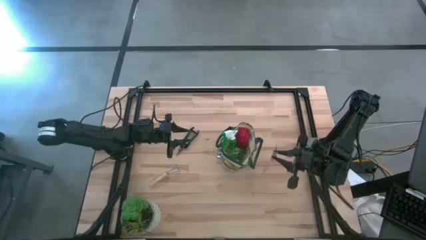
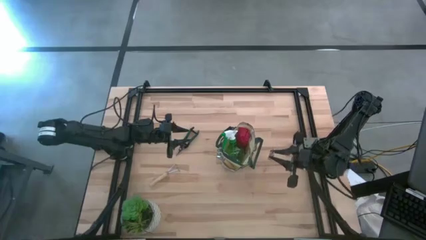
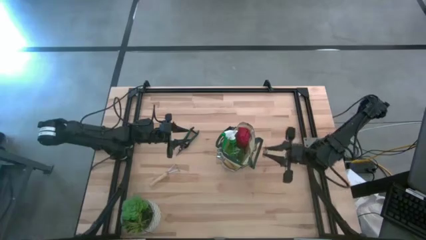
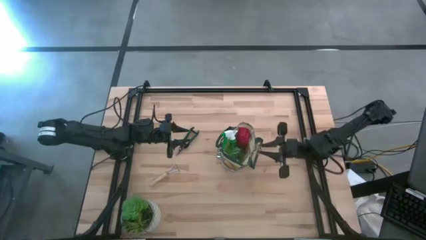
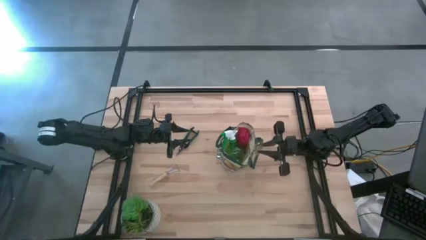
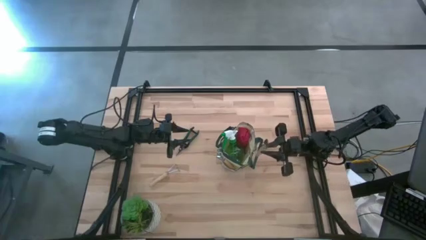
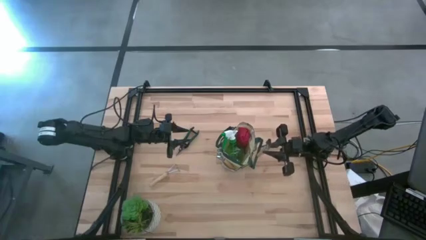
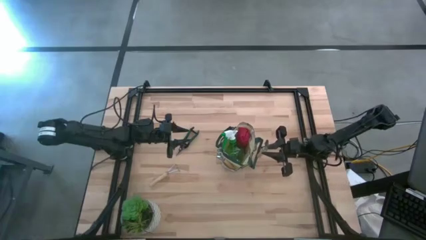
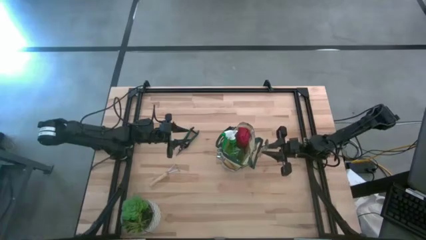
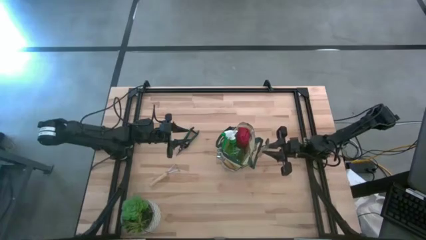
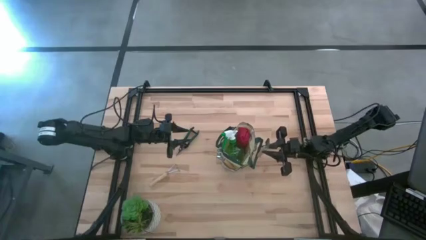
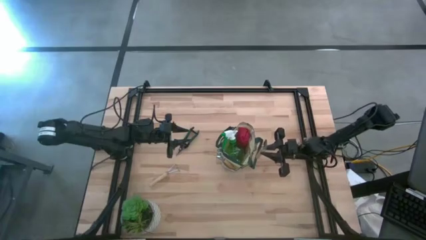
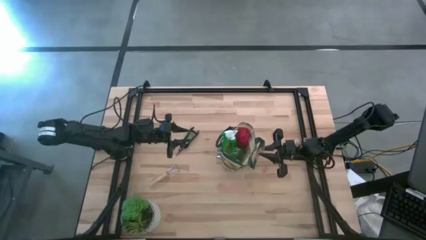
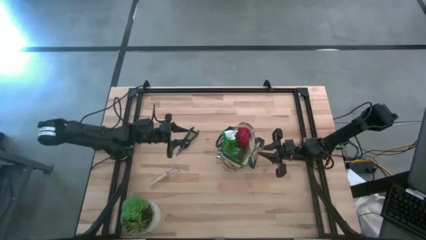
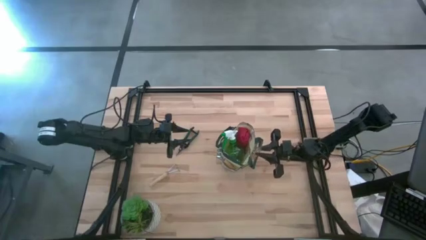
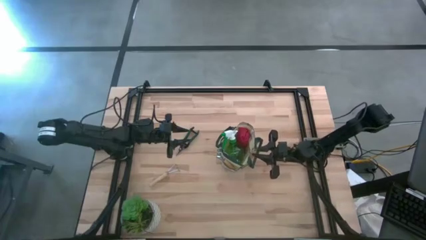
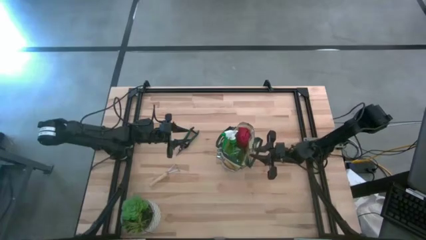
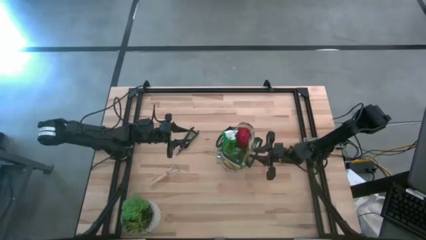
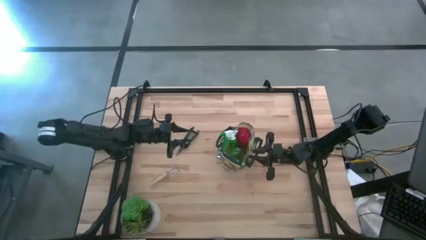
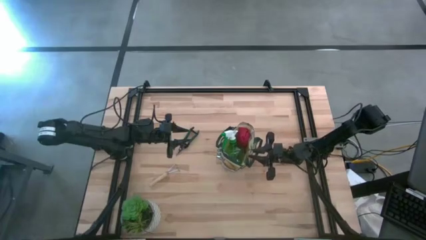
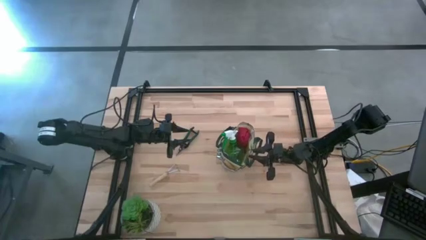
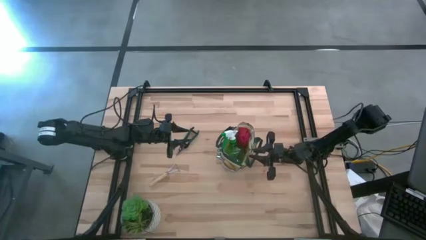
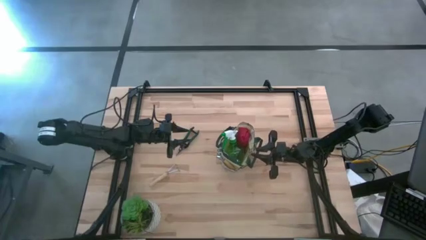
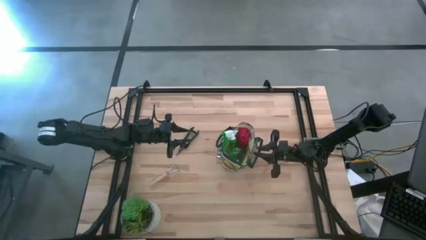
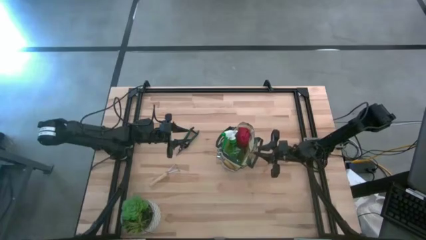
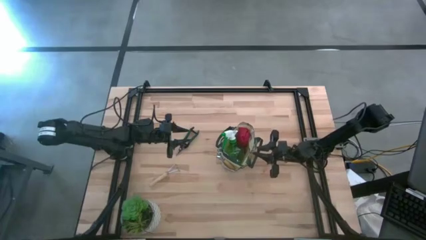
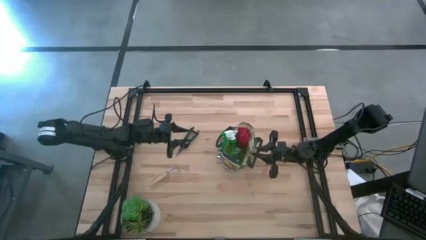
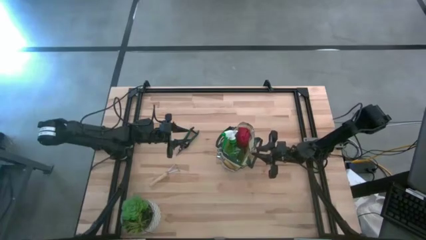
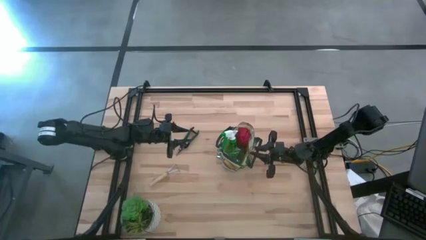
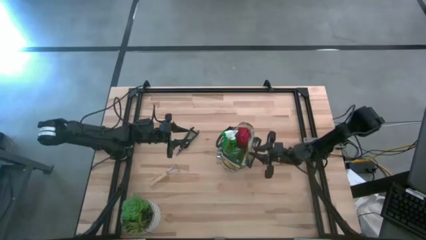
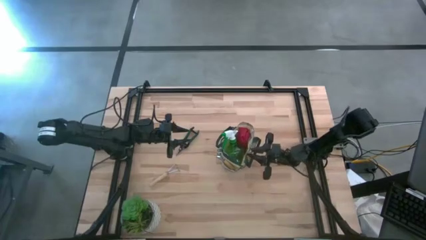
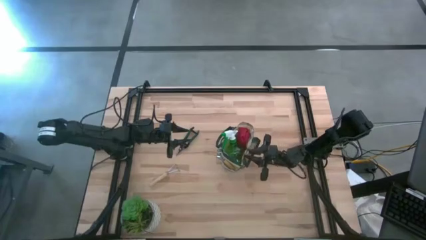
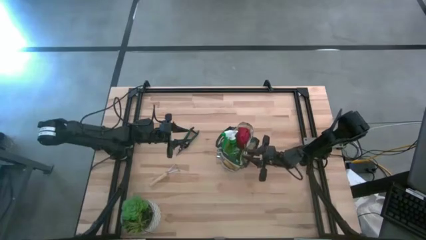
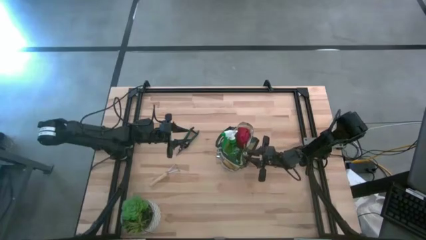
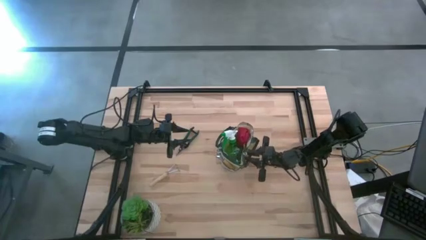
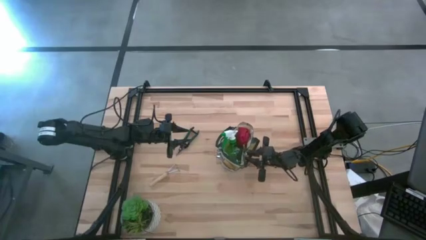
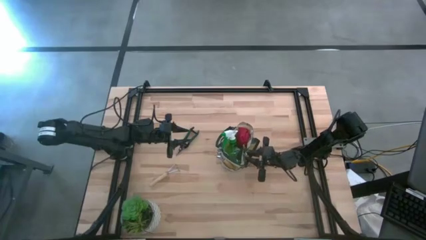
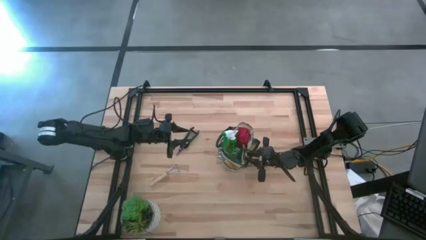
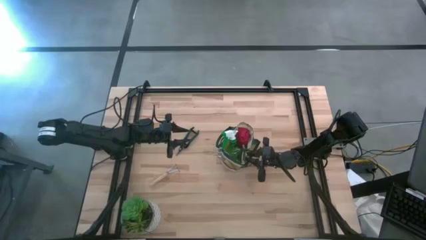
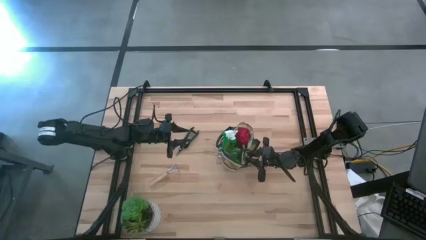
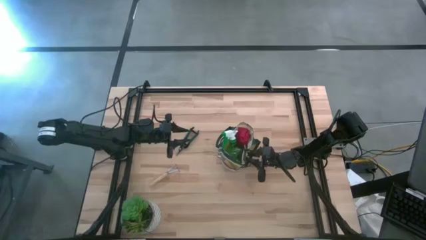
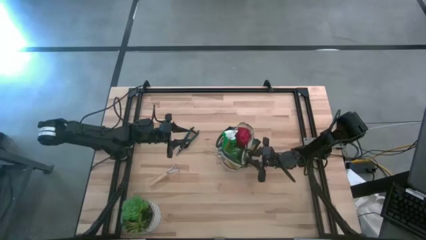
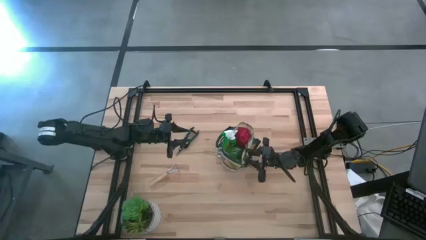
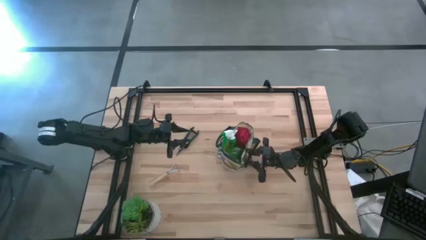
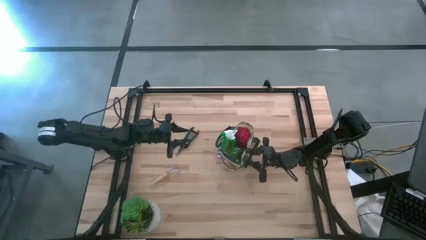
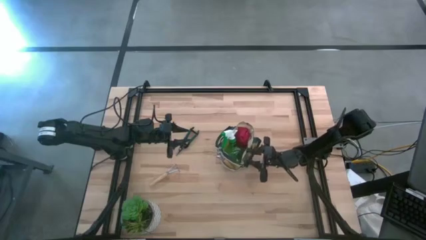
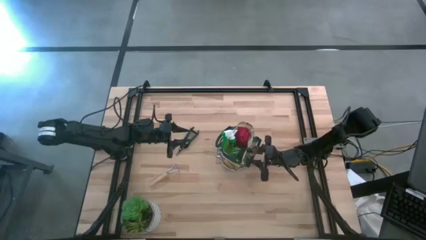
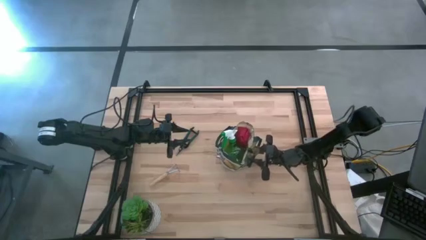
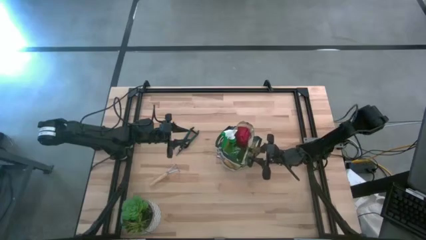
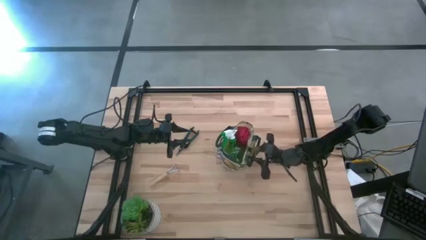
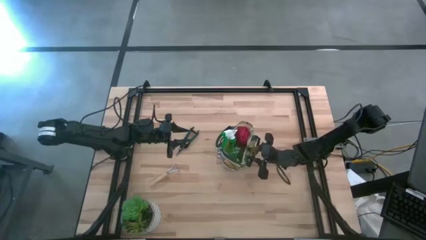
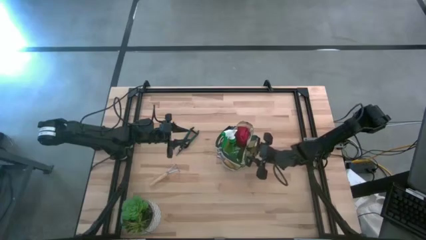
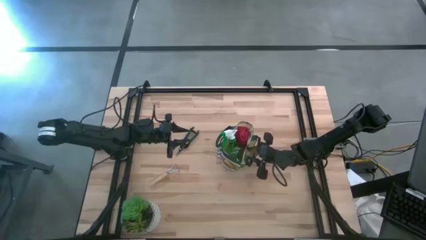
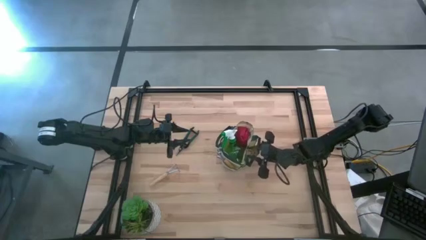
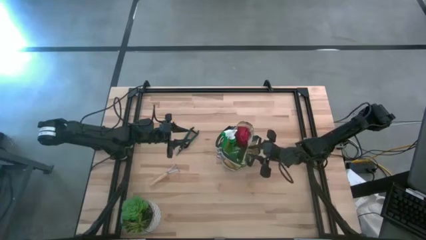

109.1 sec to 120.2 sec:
Task: Pick & Place Garden tools in Gardening bag
Put the hand trowel into the pocket of the gardening bag
